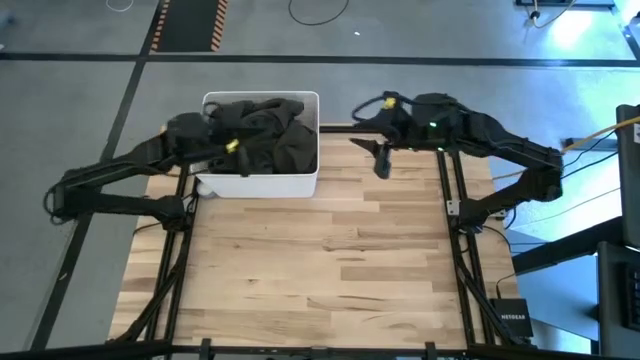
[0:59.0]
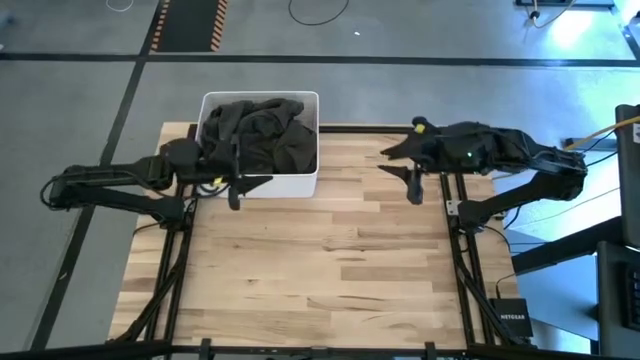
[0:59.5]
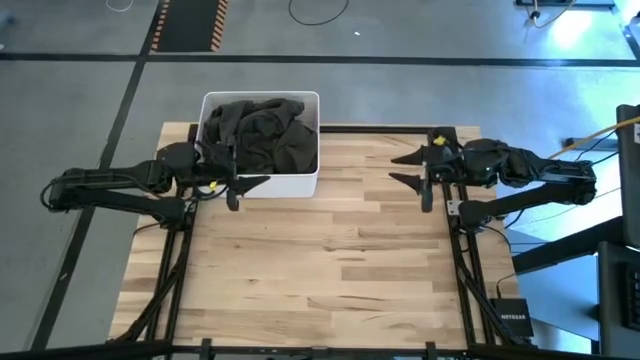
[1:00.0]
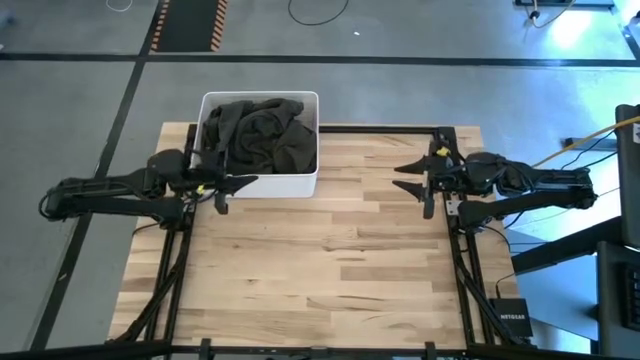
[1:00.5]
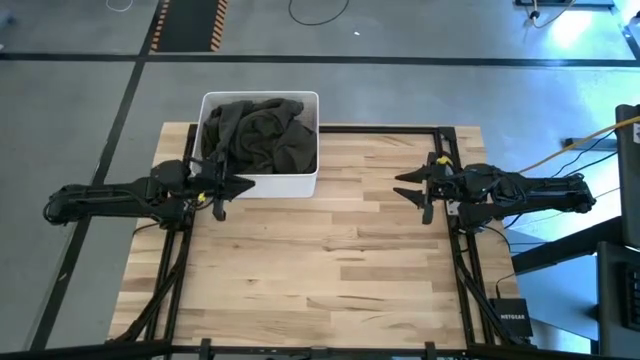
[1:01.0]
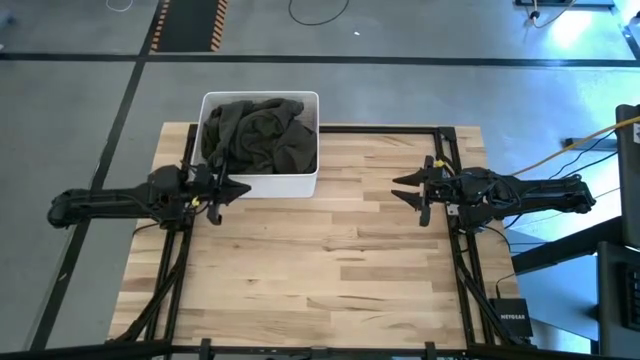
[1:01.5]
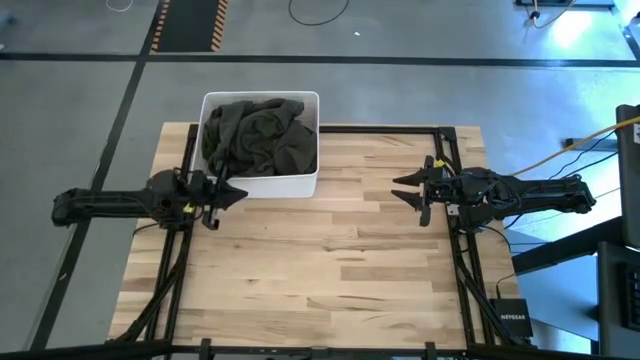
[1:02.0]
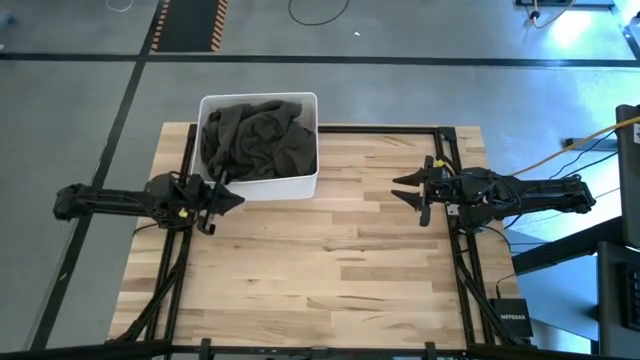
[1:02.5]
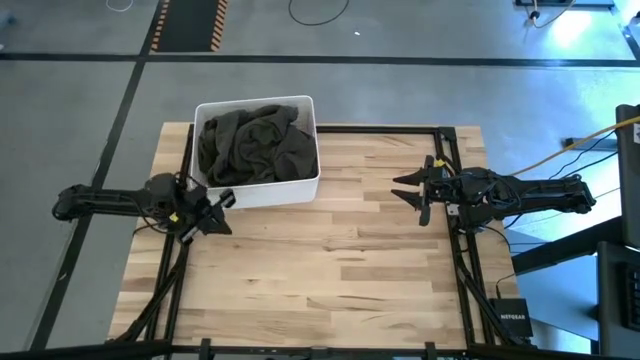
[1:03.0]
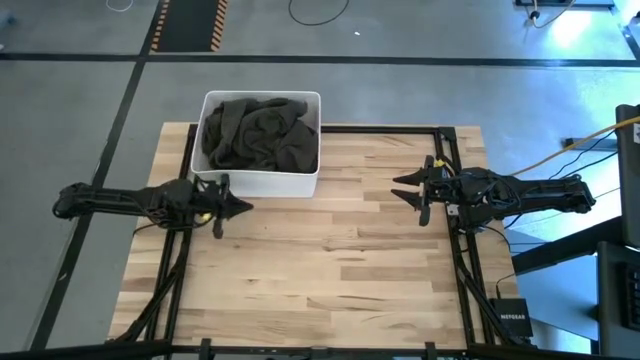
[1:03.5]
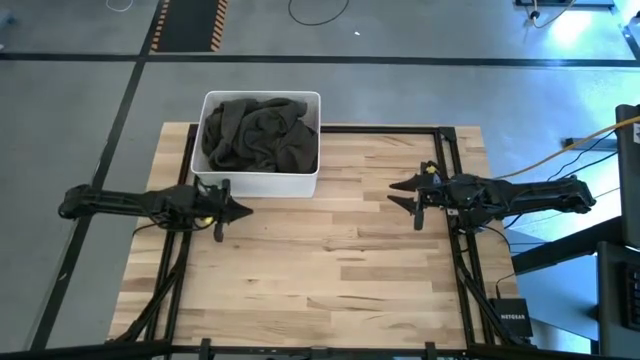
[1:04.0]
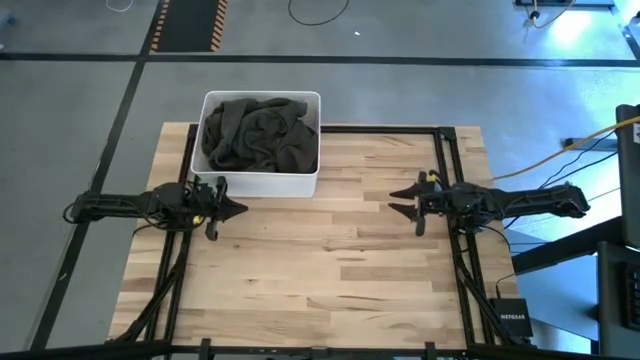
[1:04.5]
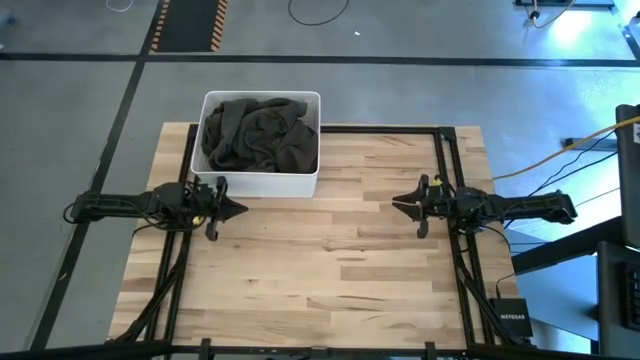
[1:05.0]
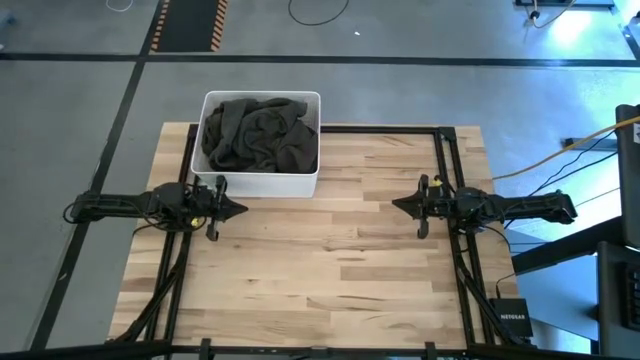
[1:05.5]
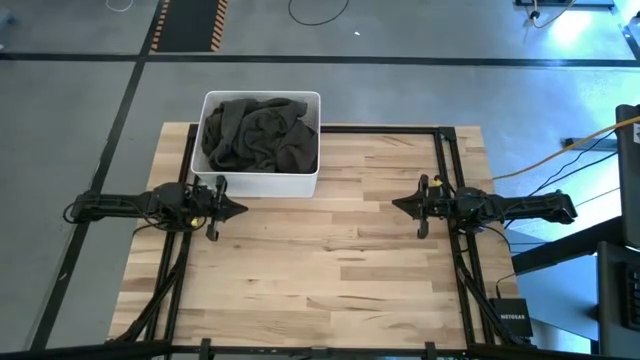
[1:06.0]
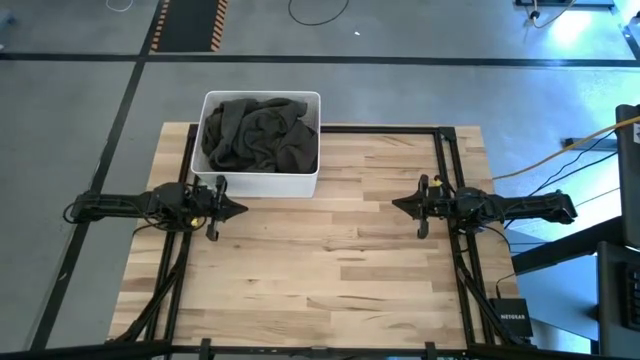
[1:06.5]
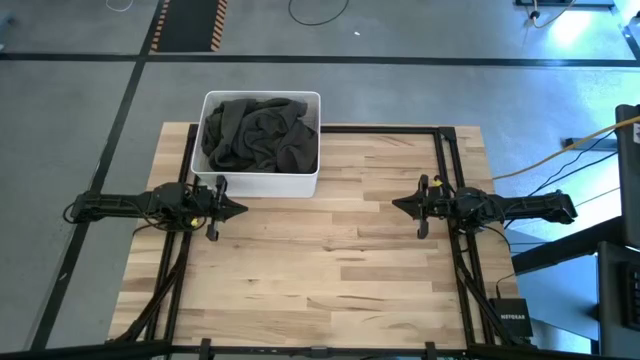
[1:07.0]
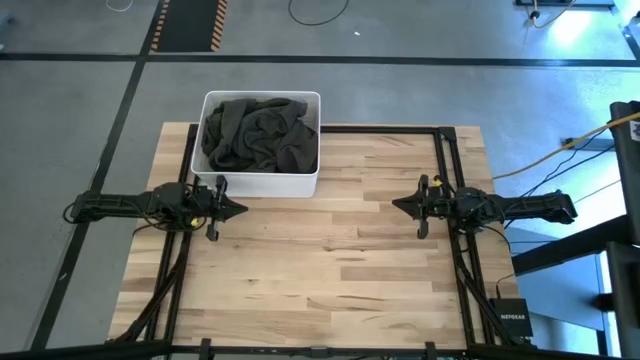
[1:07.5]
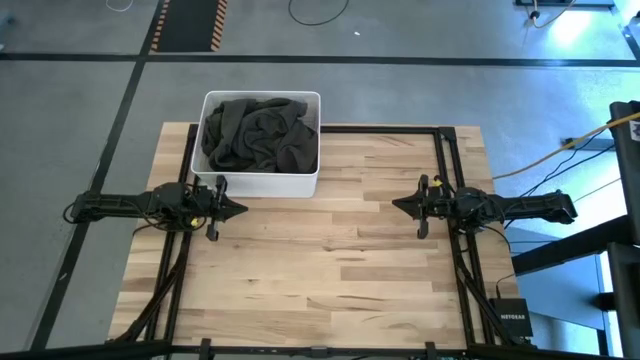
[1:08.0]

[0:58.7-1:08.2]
Task: Sort clothes
Return to Home Position

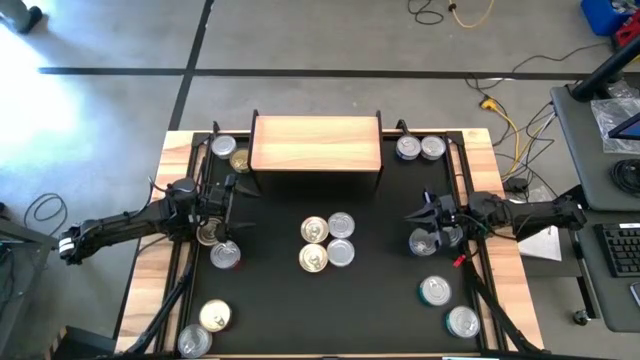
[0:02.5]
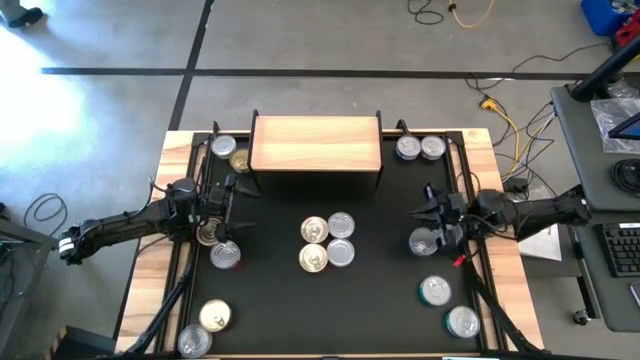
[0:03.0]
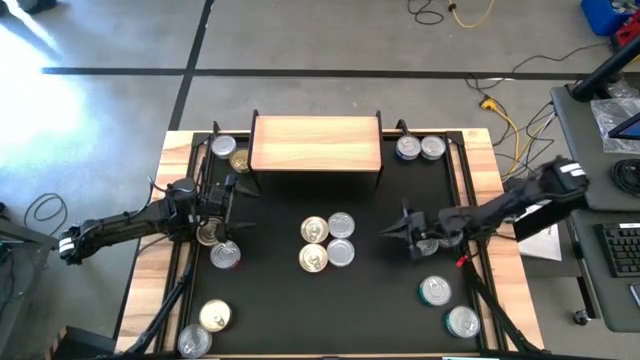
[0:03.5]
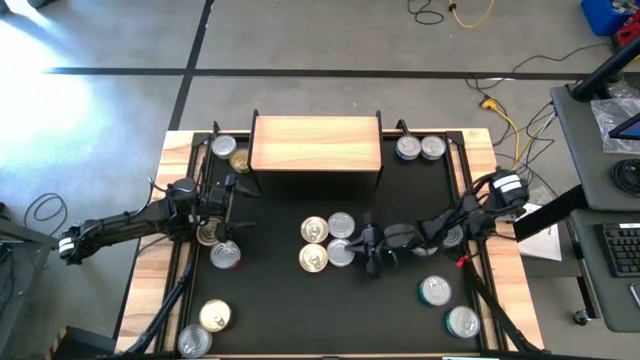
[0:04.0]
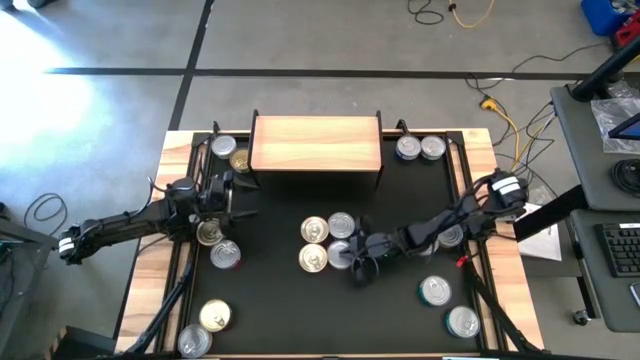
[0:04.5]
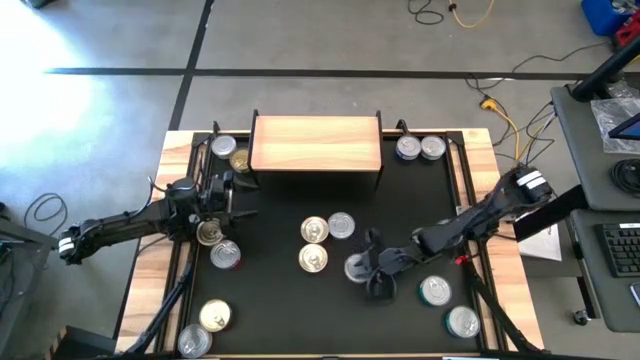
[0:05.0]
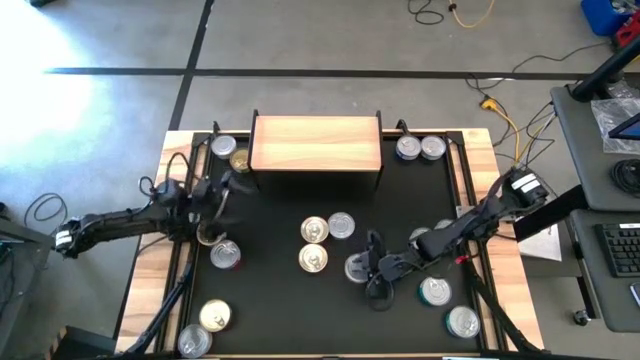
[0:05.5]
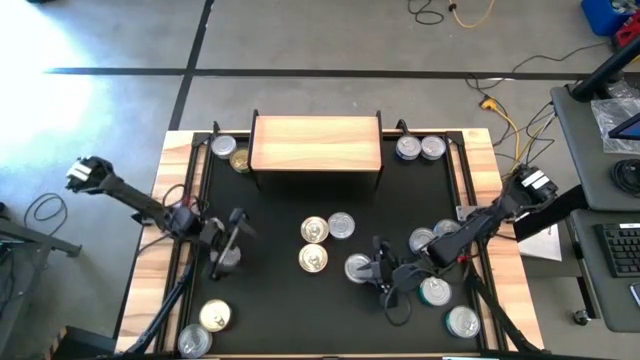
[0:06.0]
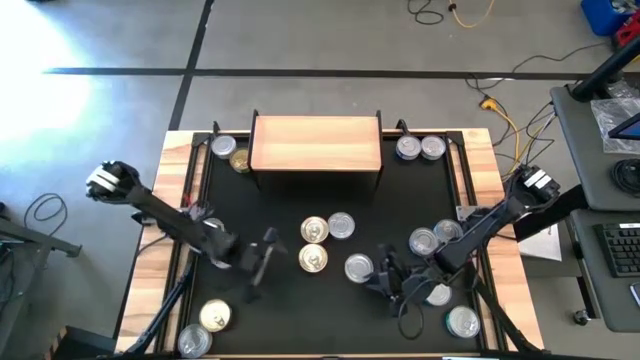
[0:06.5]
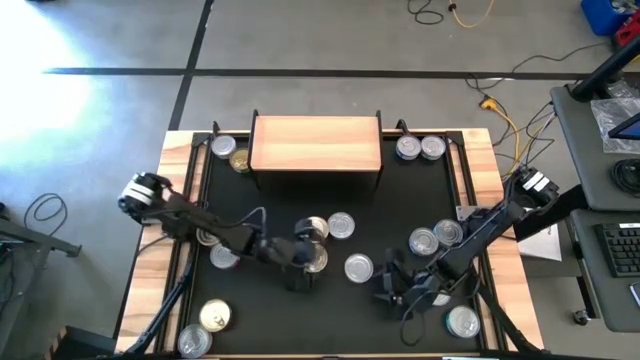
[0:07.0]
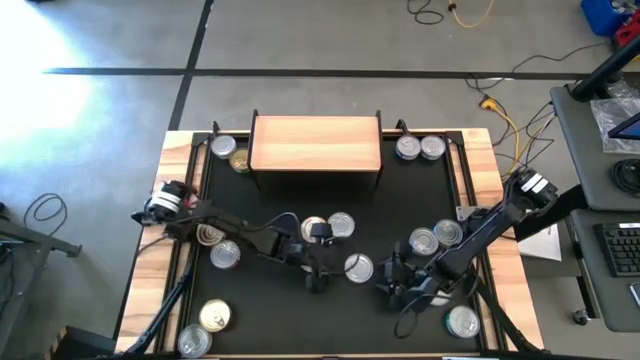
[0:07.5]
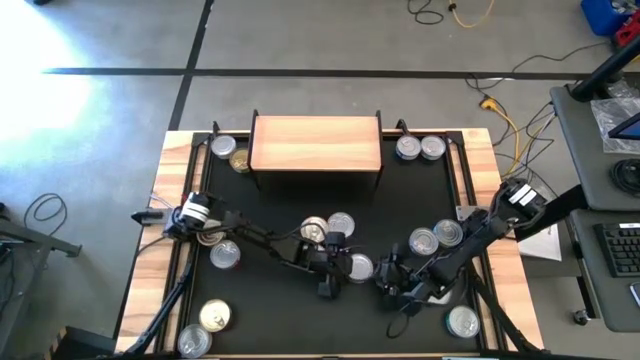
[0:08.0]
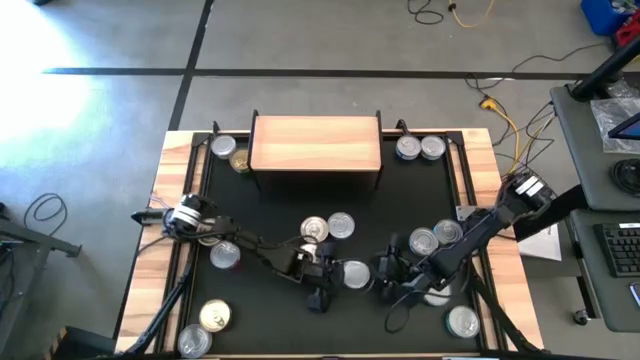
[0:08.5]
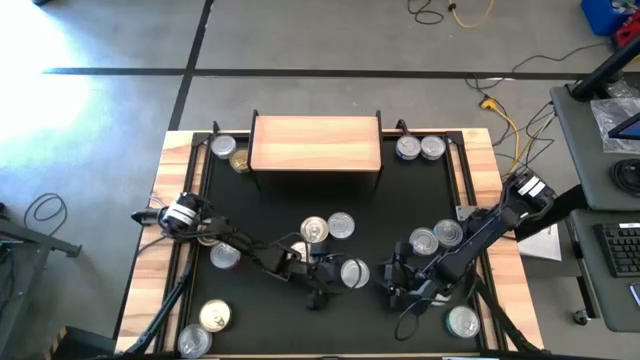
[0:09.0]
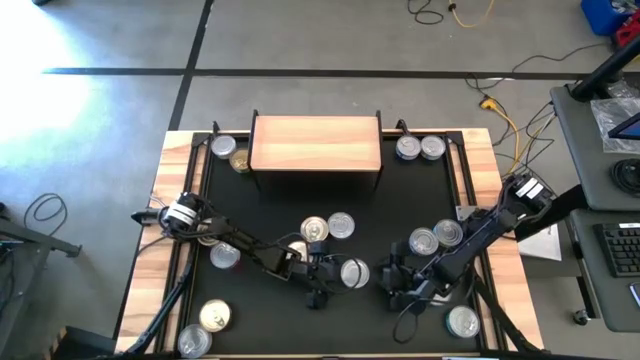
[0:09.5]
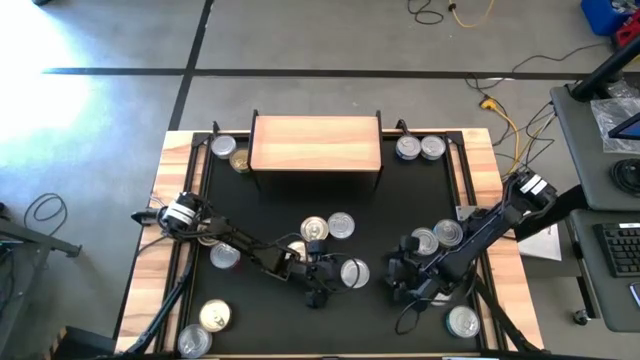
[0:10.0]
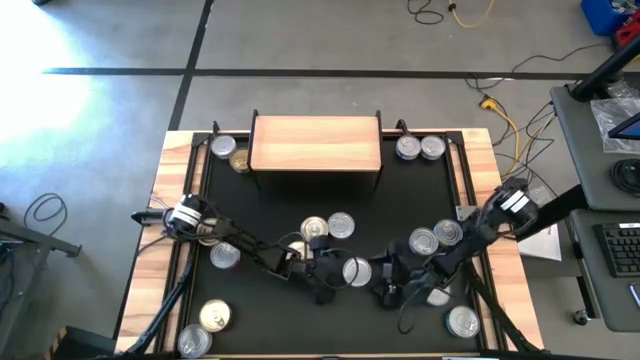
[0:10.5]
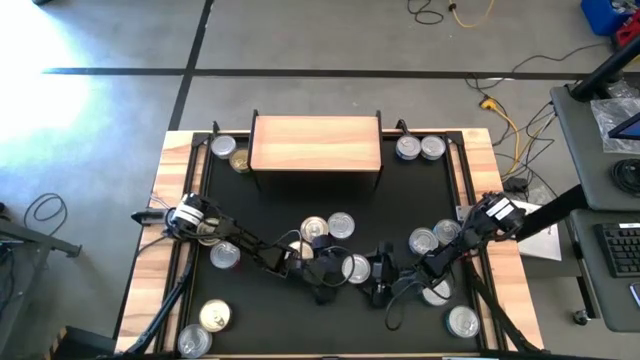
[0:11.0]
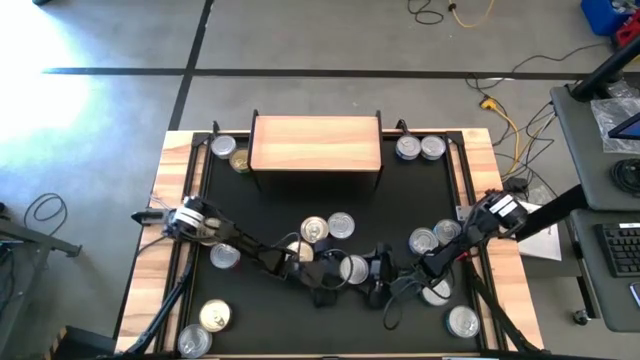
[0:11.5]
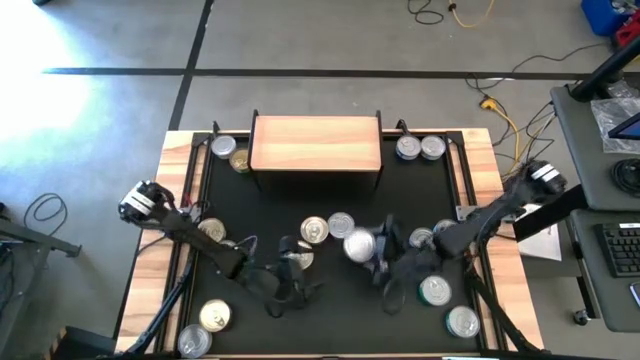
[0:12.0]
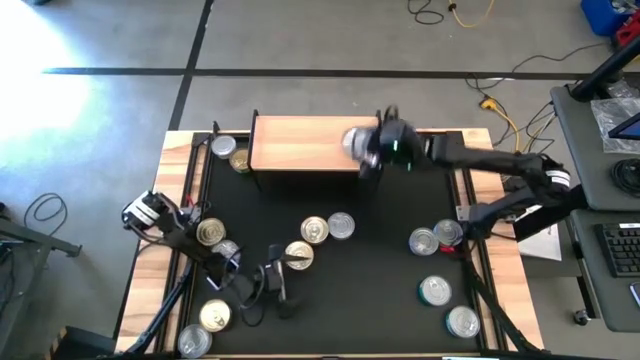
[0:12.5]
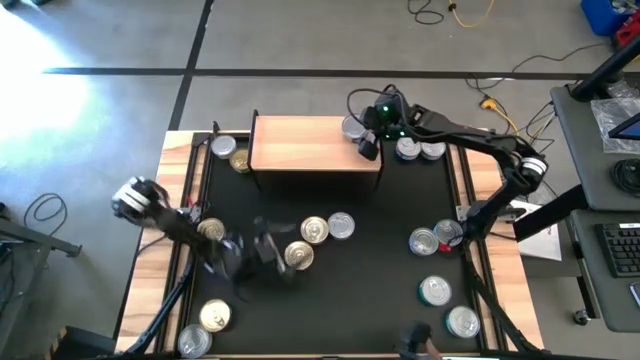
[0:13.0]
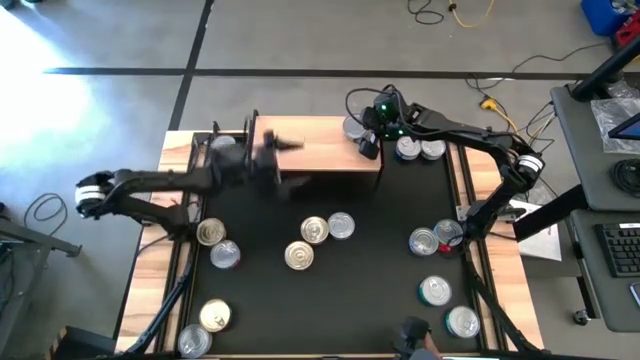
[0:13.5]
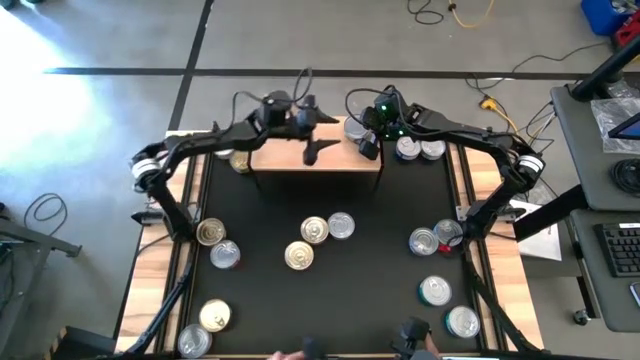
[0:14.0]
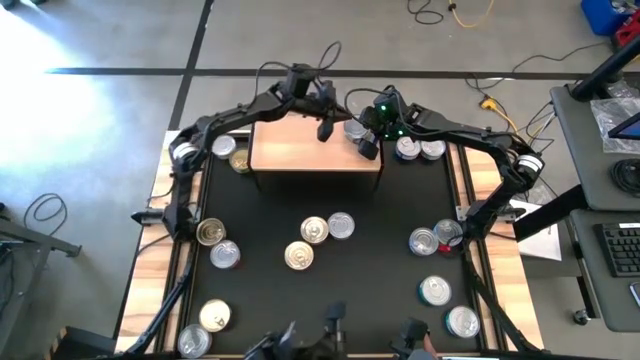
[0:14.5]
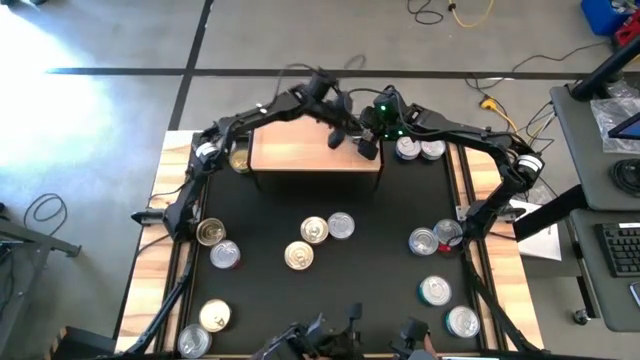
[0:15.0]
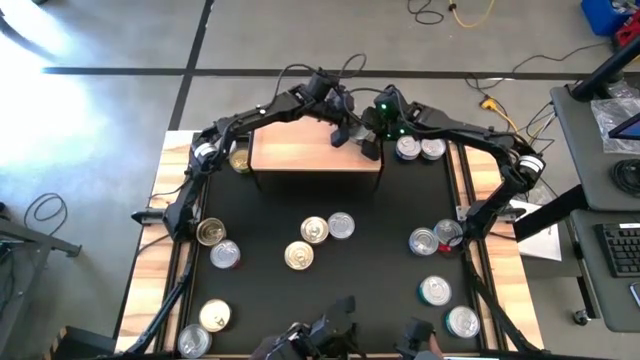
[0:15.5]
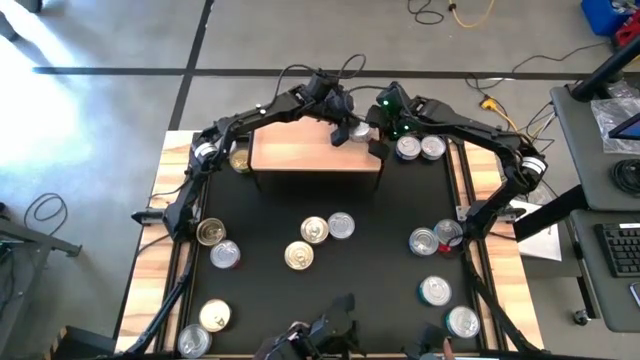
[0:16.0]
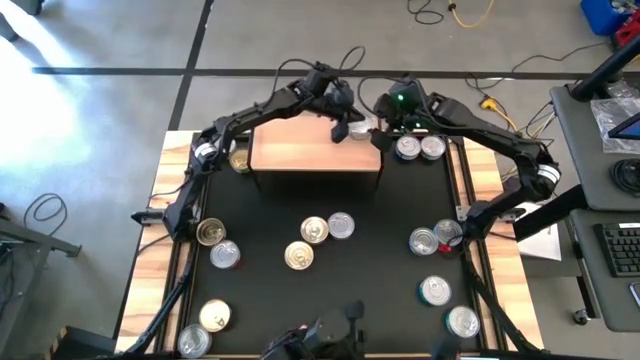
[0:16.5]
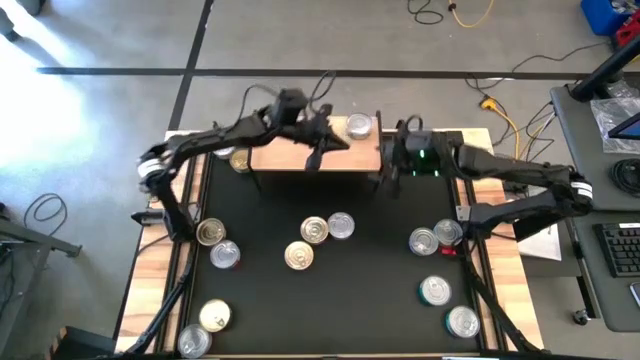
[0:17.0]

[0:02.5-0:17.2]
Task: Stack canned seafood by type on shelf
Put the bottom light green tuna can on the shelf
